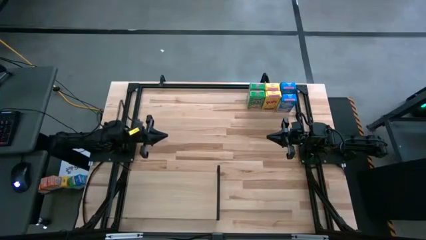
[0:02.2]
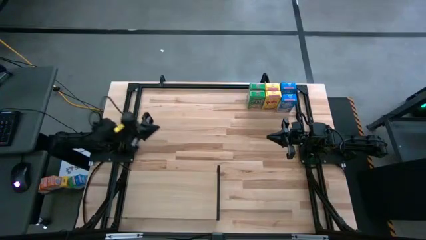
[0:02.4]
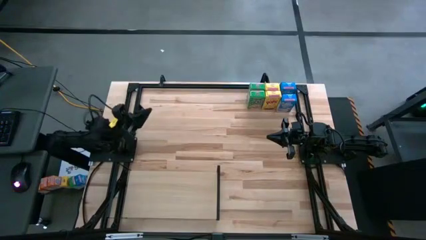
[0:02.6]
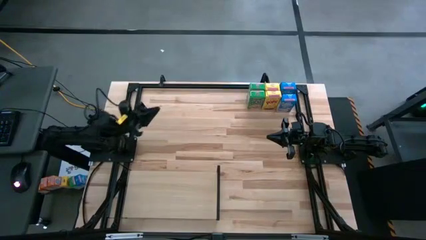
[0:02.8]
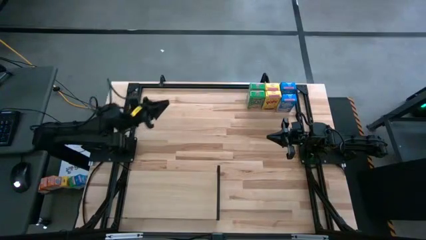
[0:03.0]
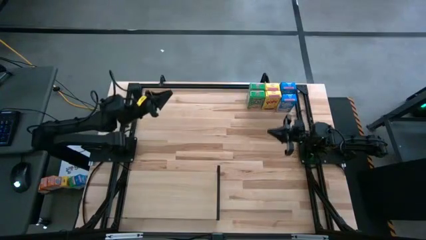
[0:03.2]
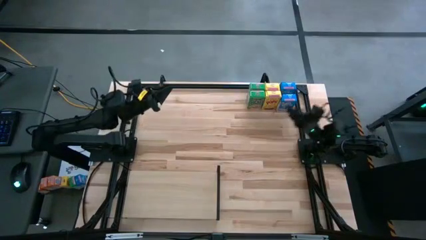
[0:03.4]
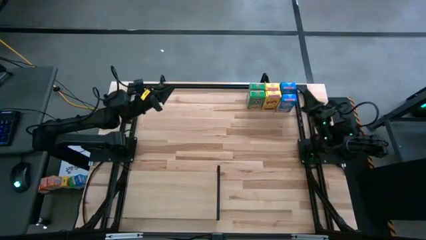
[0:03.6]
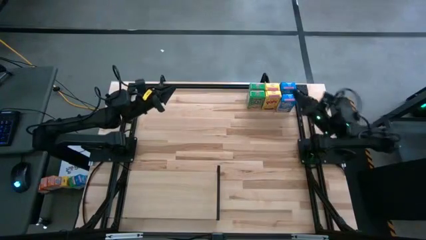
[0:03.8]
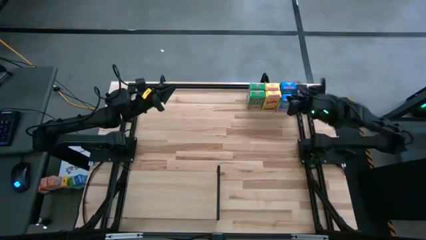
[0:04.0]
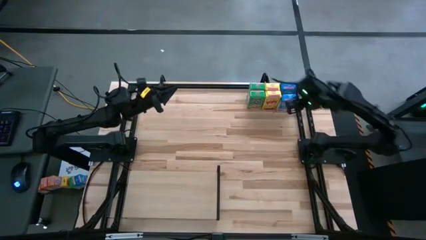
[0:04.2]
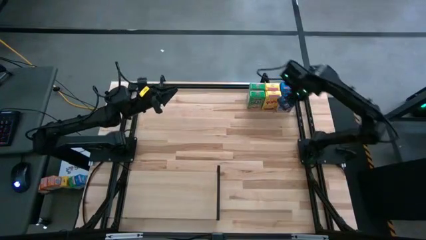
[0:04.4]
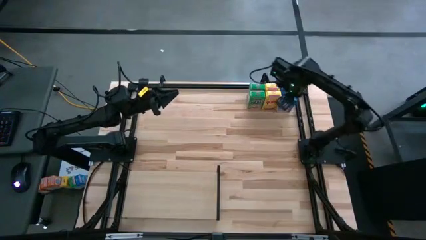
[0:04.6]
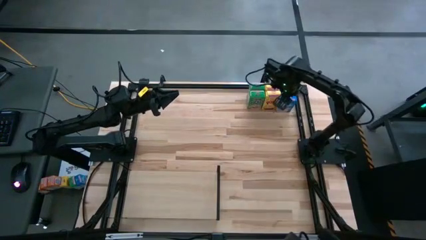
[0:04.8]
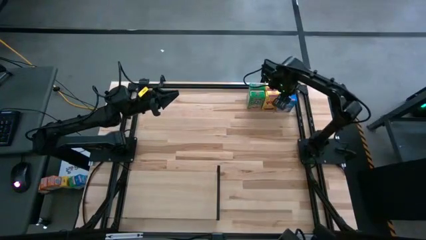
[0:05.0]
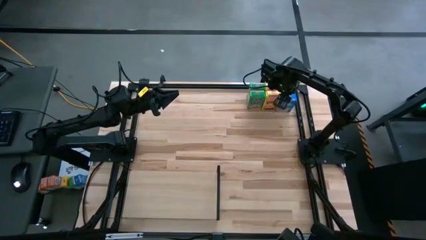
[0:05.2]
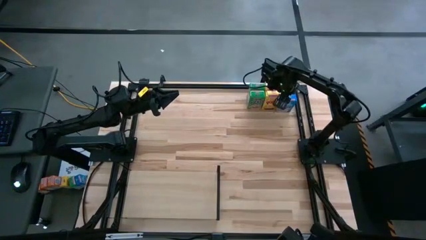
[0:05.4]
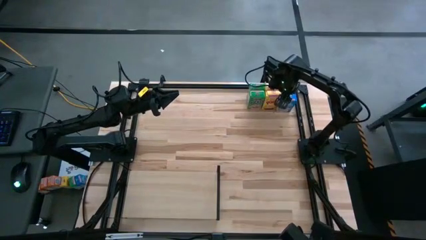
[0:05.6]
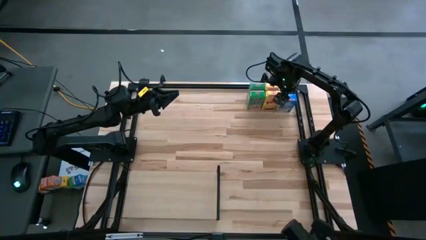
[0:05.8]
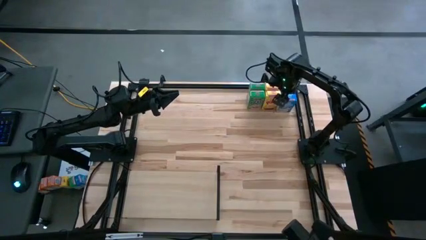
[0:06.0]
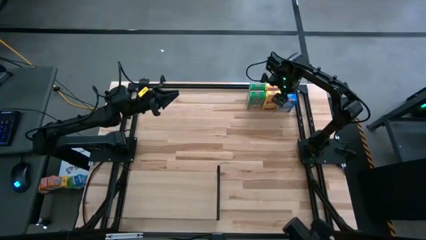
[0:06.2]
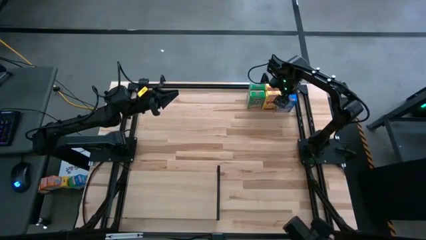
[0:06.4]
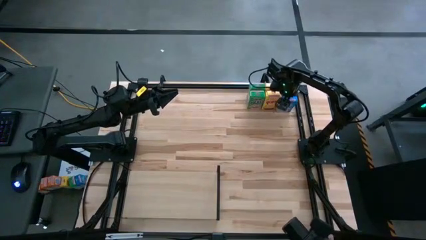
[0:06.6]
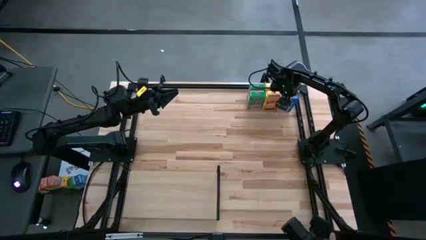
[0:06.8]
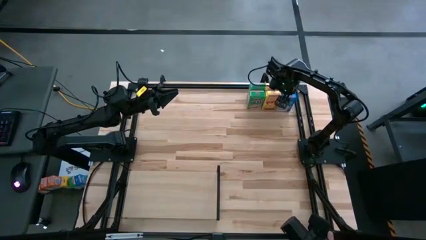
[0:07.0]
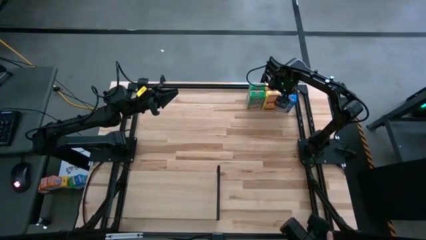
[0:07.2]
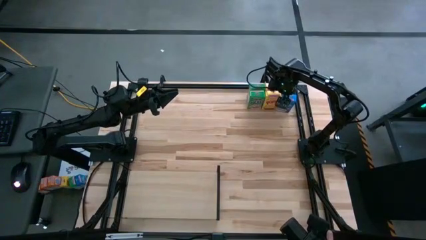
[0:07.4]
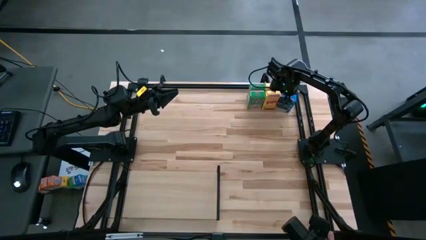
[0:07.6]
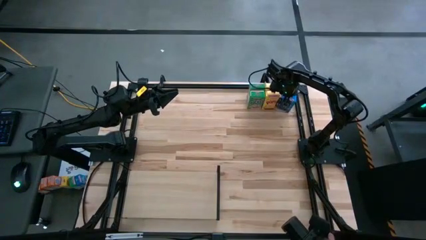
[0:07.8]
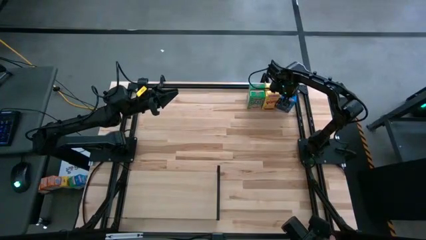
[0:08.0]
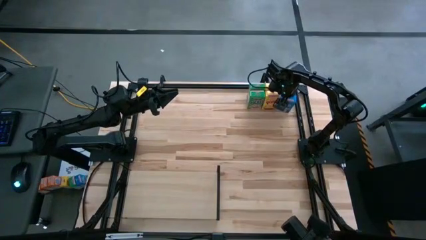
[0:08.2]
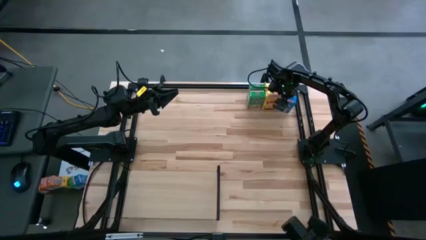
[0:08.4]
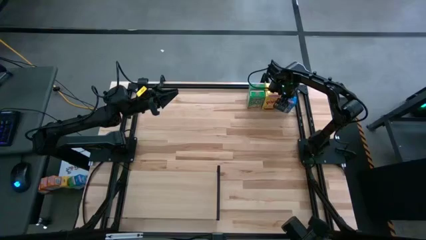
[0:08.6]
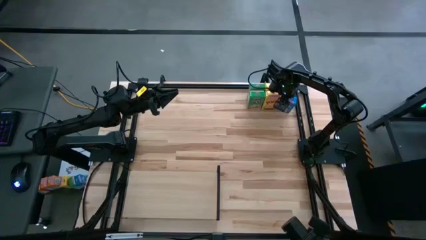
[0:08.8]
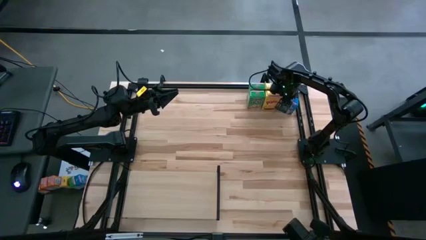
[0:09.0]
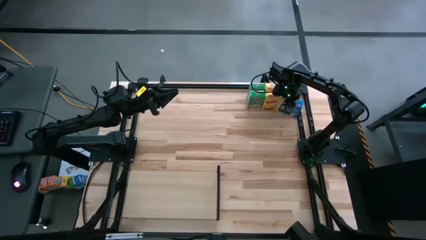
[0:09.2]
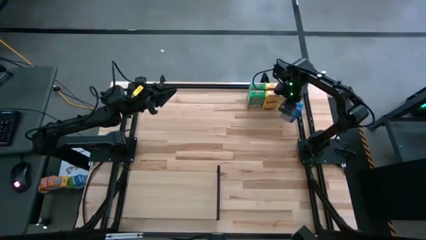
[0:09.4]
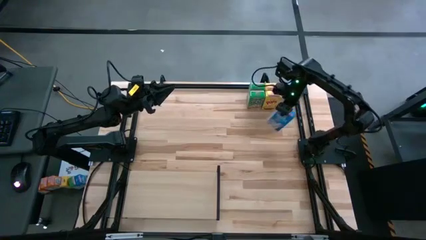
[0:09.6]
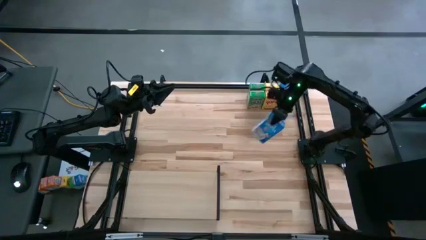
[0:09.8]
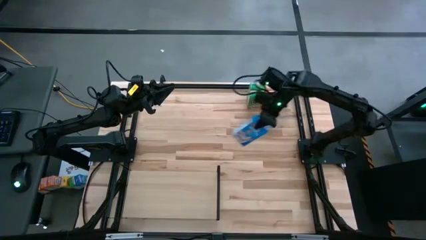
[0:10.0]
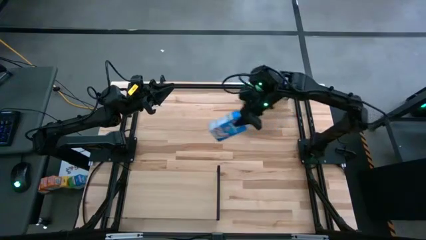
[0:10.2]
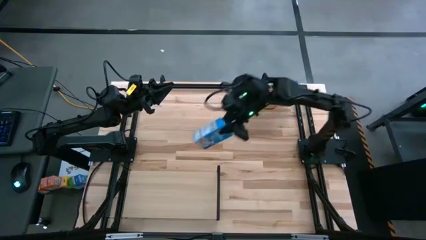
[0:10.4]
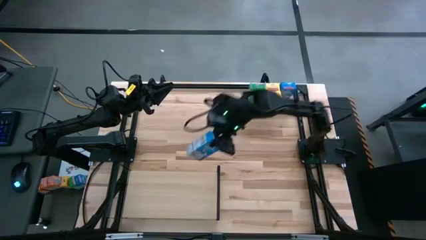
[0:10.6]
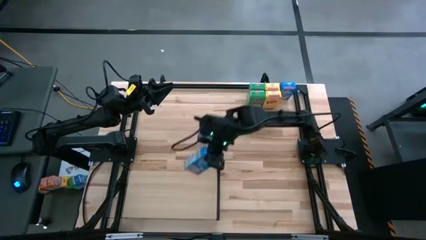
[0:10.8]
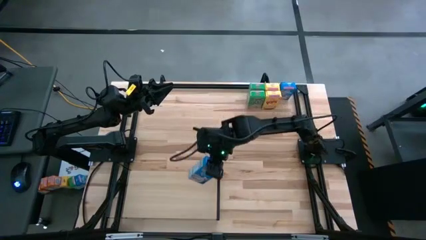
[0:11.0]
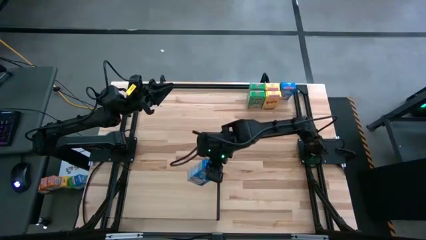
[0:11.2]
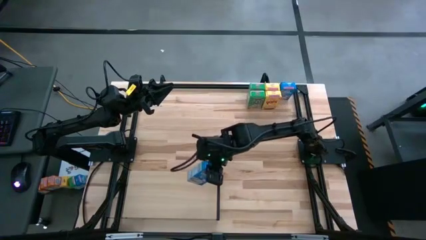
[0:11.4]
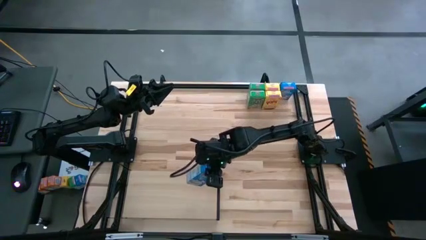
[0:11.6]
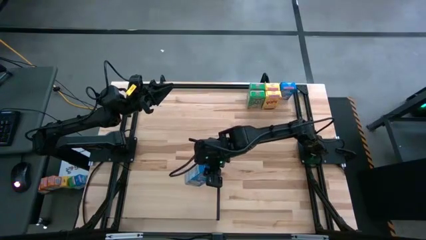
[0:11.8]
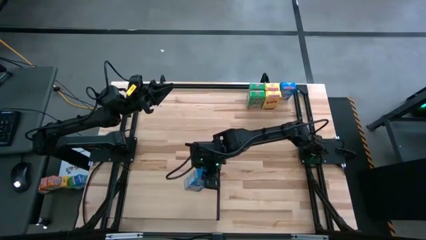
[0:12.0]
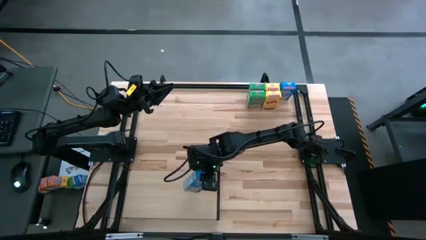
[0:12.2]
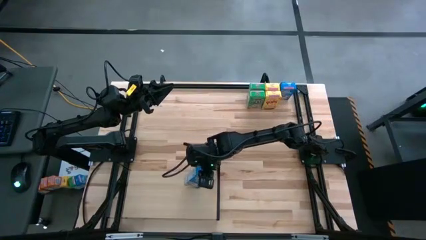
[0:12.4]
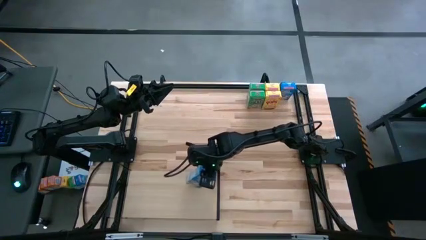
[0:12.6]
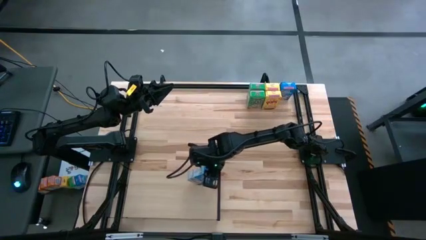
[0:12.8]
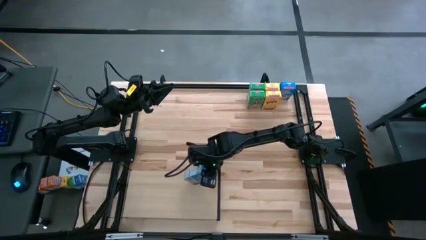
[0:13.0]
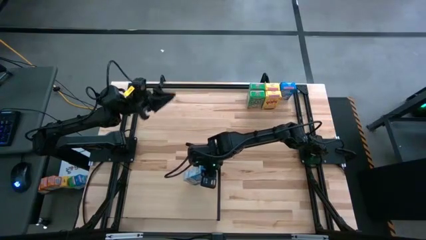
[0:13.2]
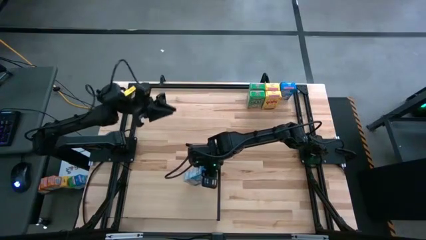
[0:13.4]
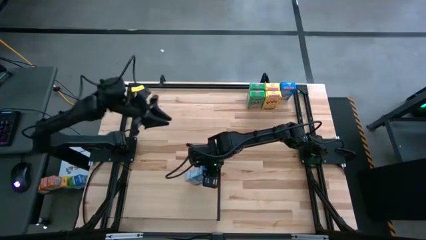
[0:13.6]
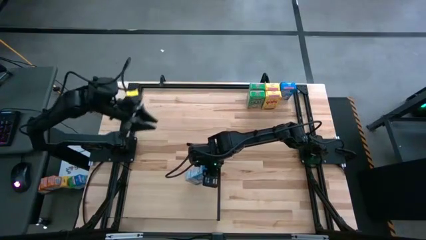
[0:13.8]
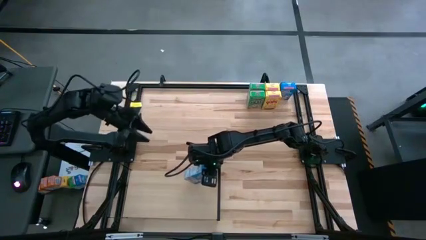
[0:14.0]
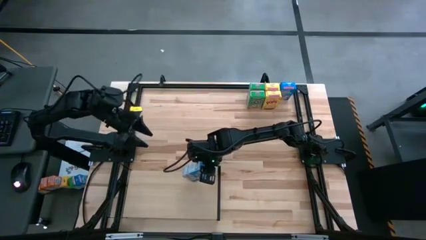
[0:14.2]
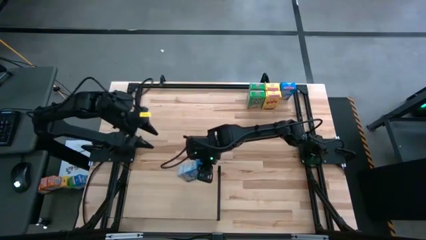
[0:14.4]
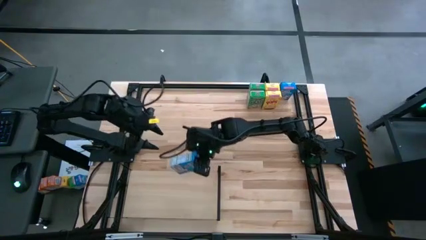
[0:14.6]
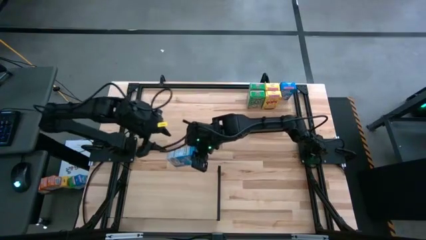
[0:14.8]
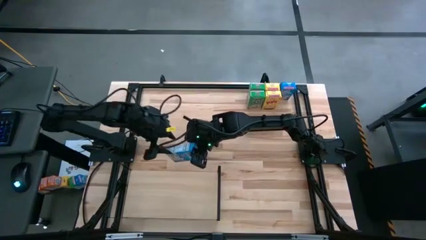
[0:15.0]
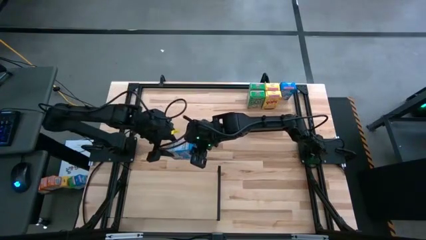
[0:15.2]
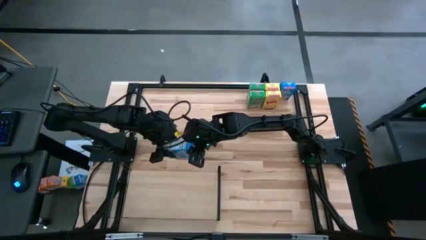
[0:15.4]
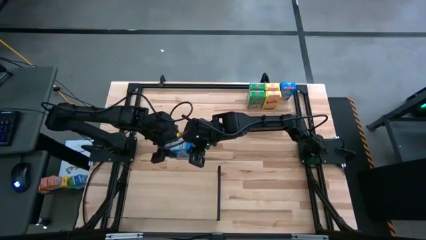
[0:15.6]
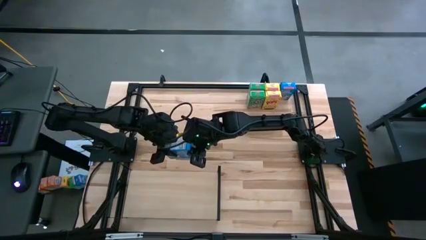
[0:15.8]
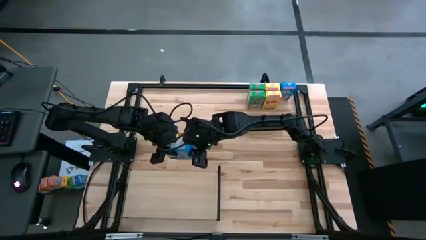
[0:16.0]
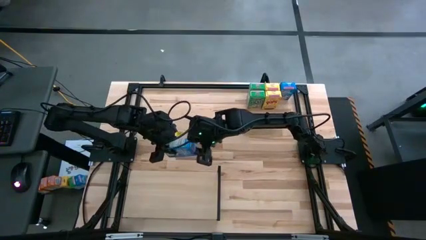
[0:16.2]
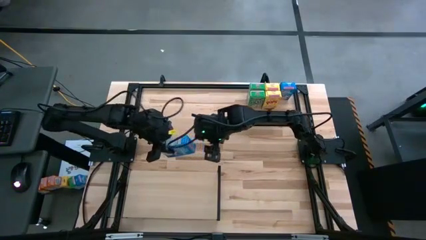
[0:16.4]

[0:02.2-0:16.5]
Task: Stack cereal on shelf
Put the bottom blue cereal box on the shelf
